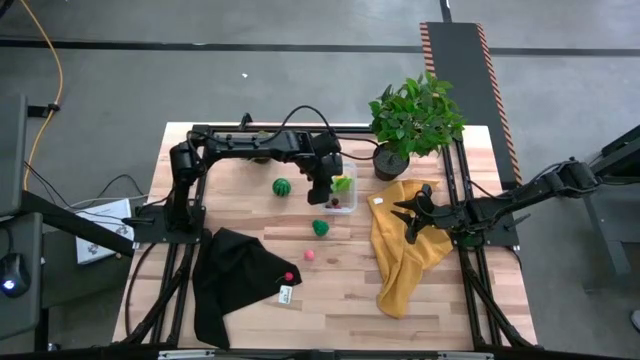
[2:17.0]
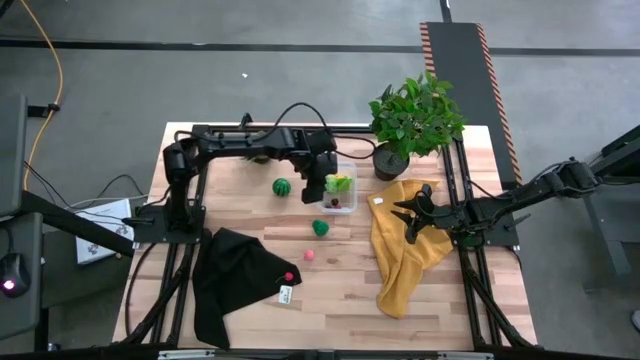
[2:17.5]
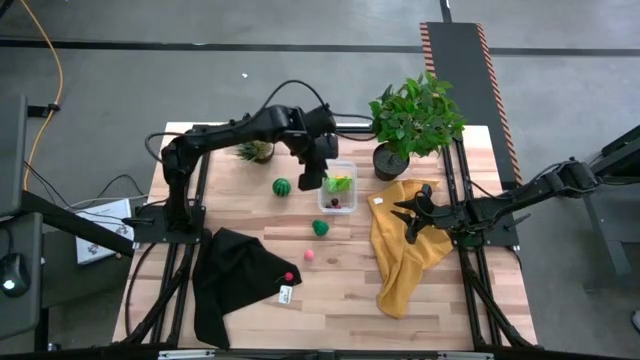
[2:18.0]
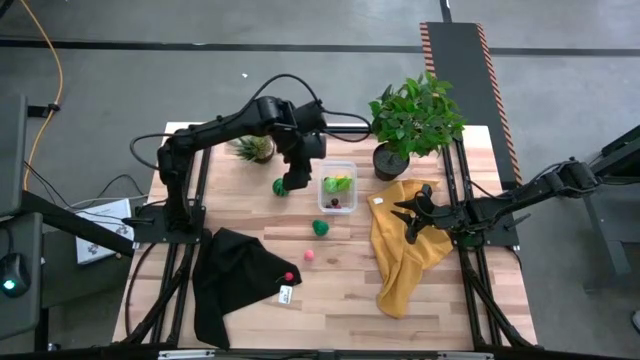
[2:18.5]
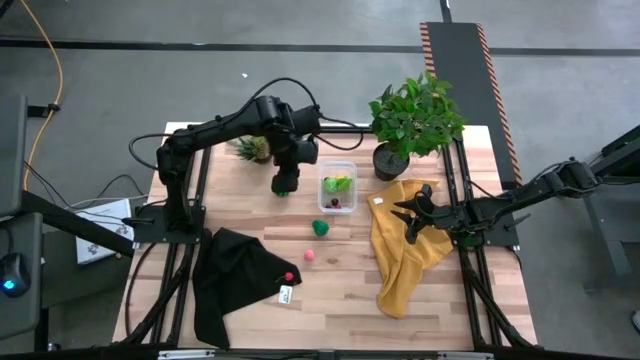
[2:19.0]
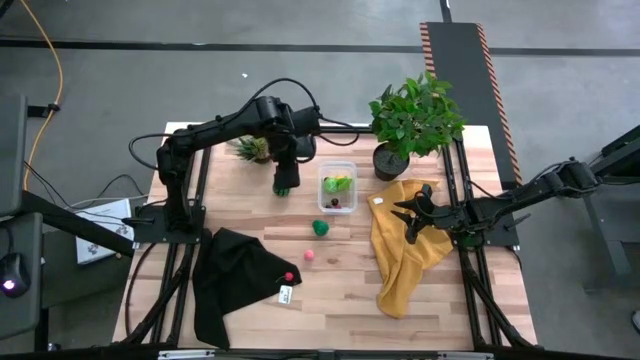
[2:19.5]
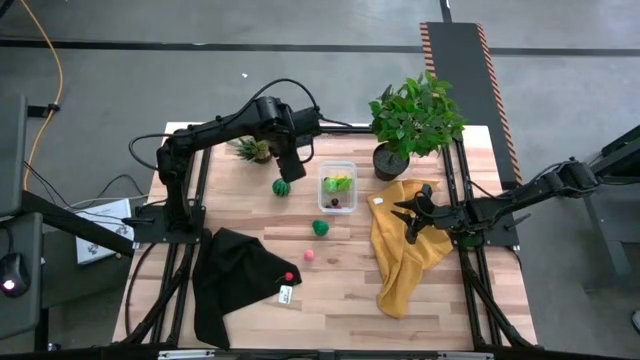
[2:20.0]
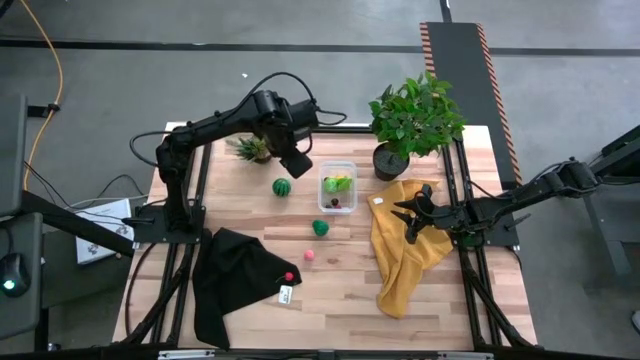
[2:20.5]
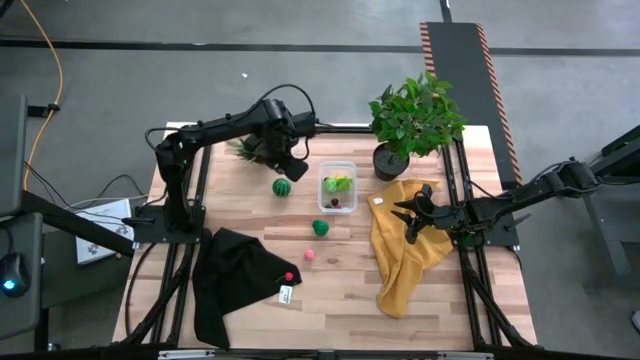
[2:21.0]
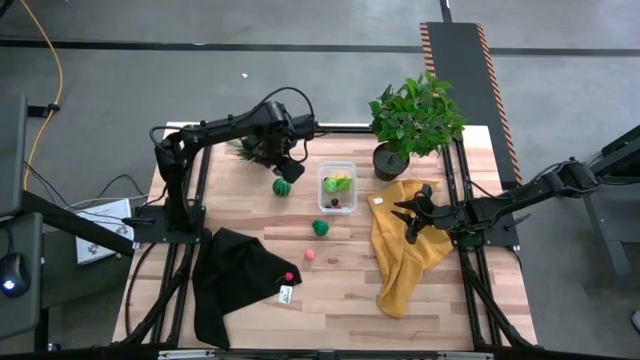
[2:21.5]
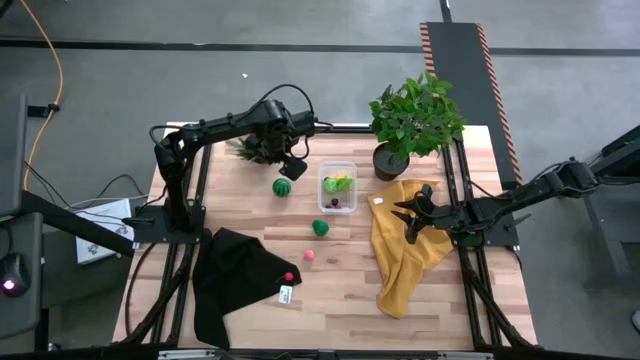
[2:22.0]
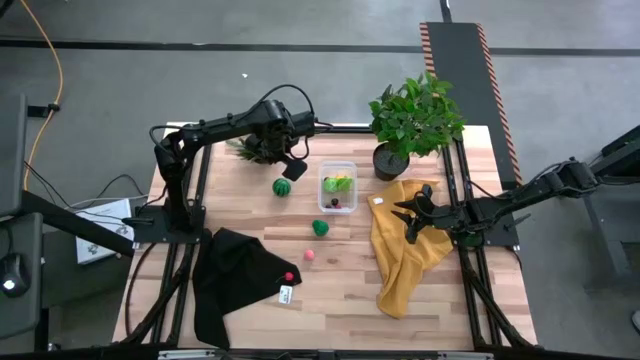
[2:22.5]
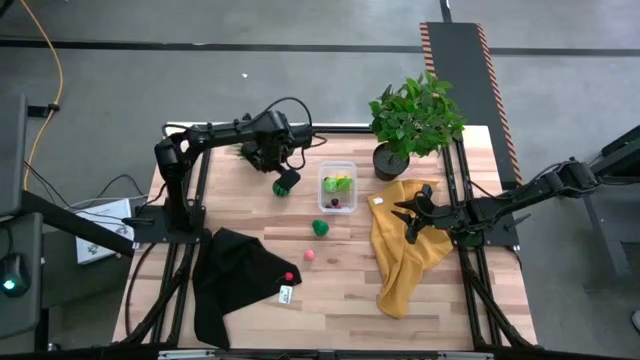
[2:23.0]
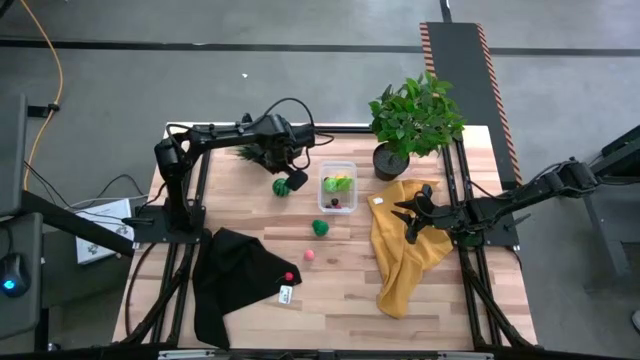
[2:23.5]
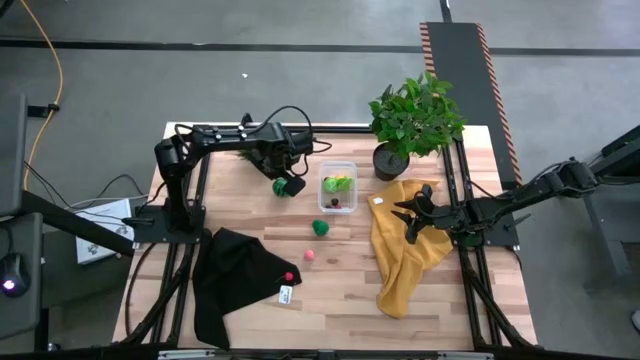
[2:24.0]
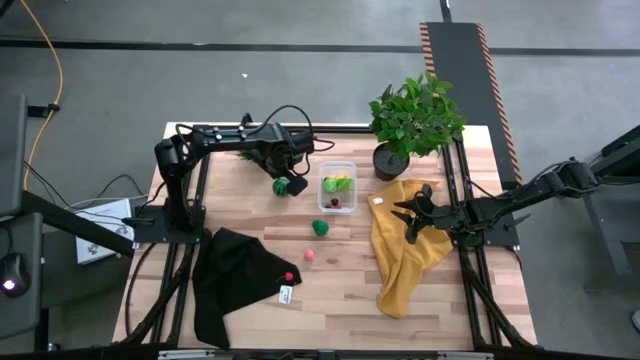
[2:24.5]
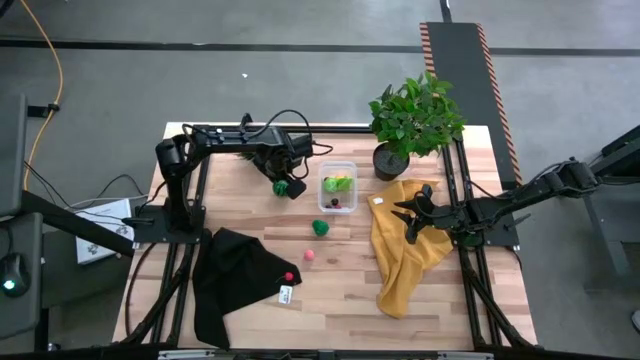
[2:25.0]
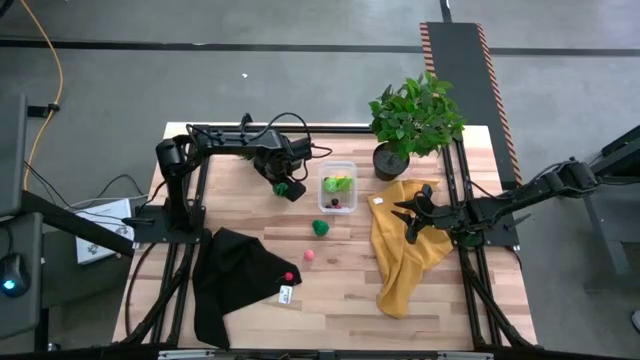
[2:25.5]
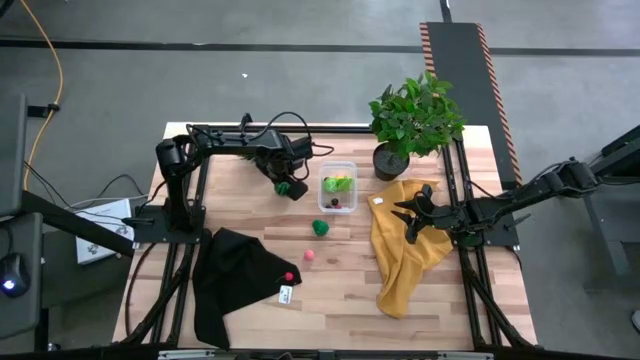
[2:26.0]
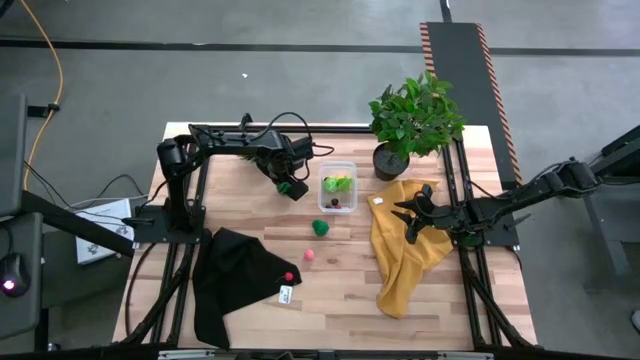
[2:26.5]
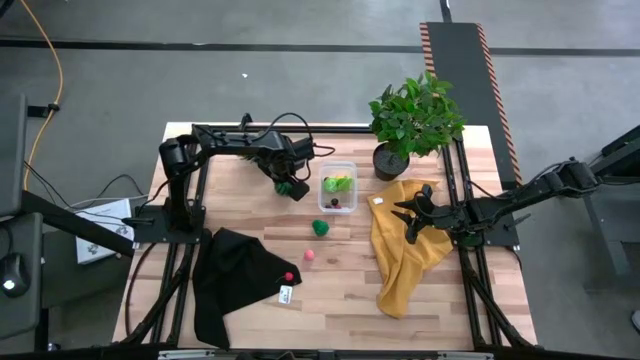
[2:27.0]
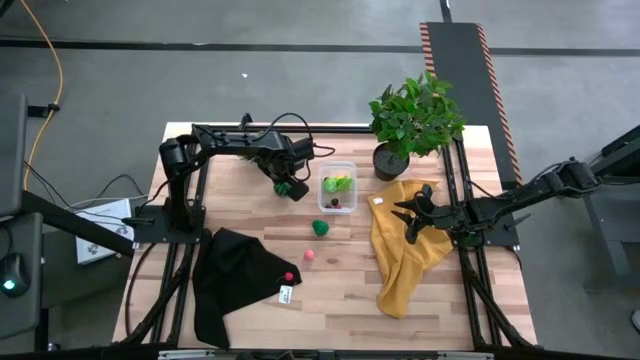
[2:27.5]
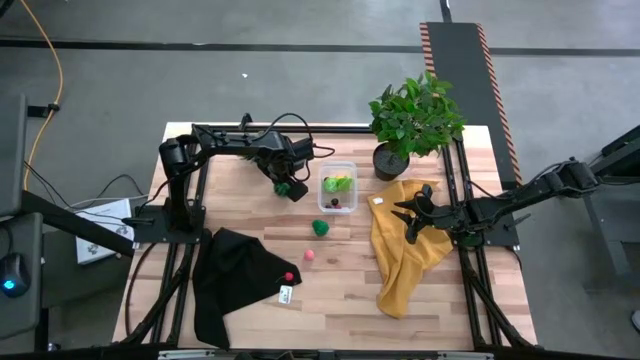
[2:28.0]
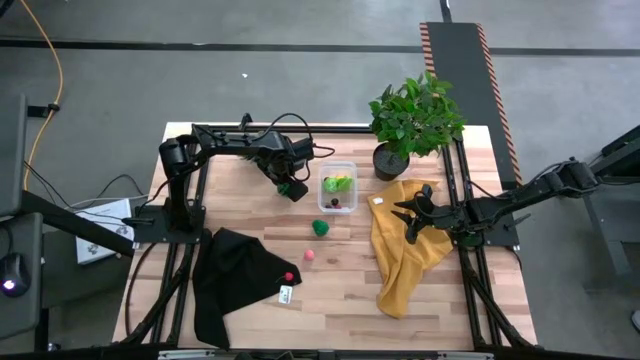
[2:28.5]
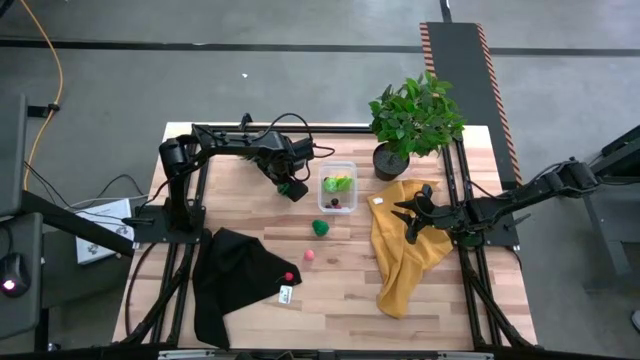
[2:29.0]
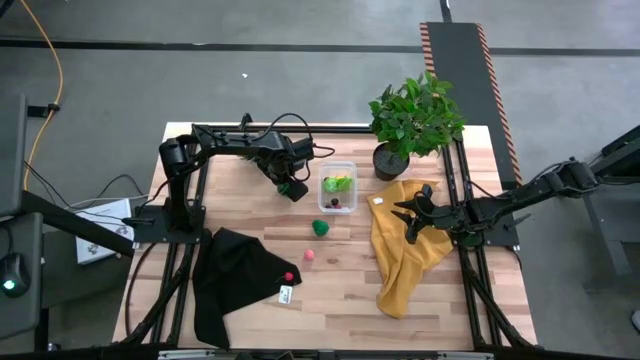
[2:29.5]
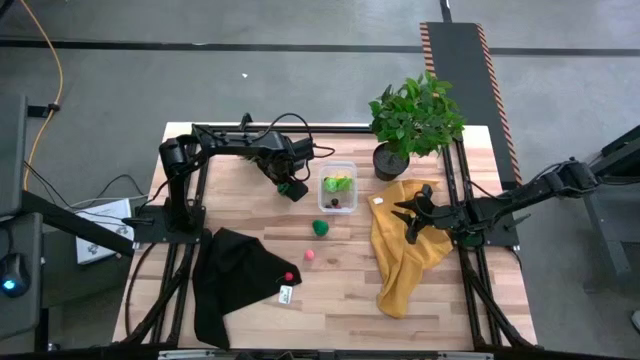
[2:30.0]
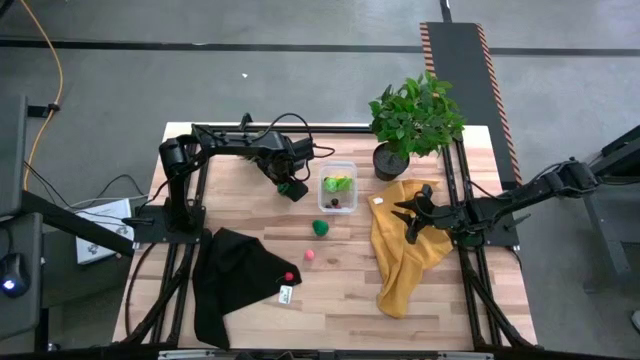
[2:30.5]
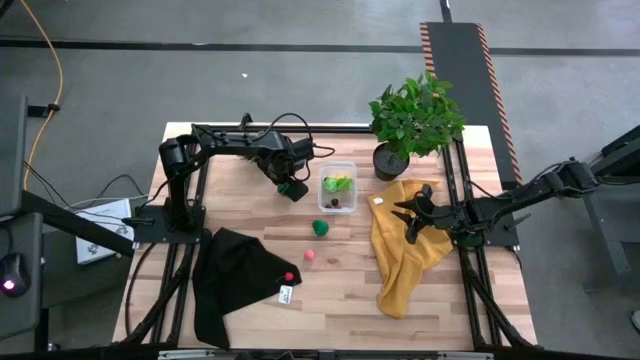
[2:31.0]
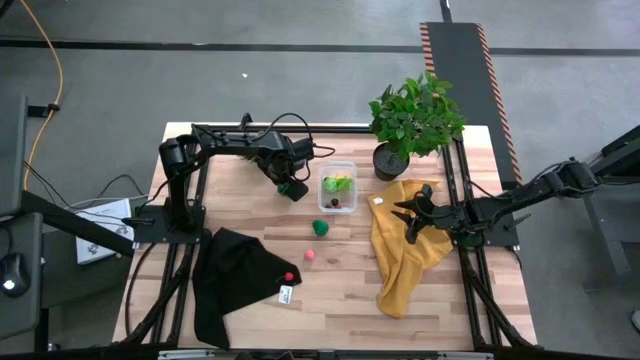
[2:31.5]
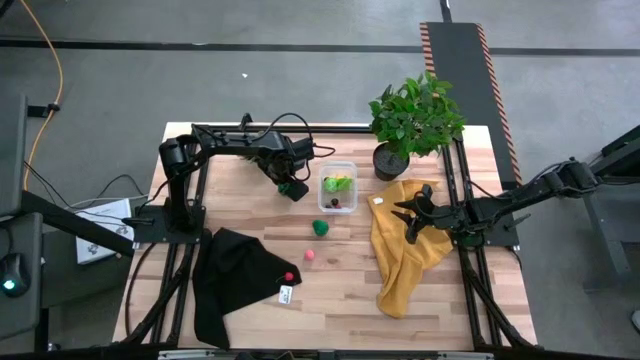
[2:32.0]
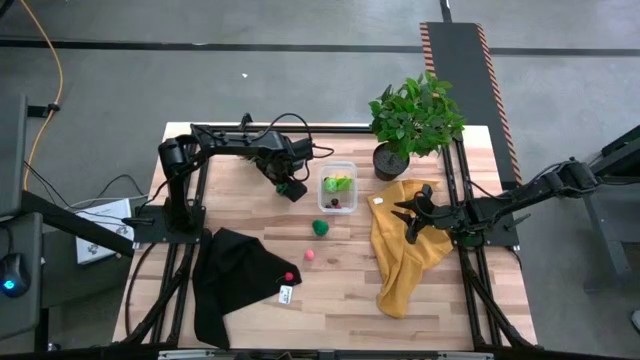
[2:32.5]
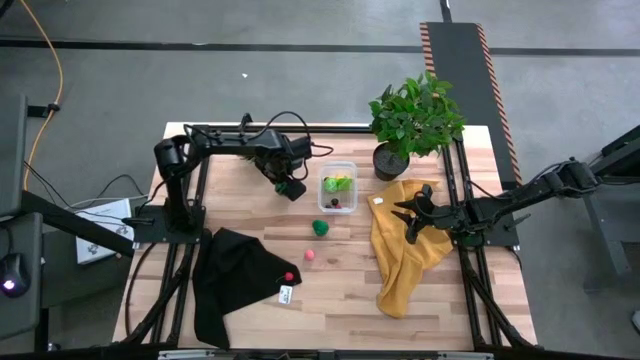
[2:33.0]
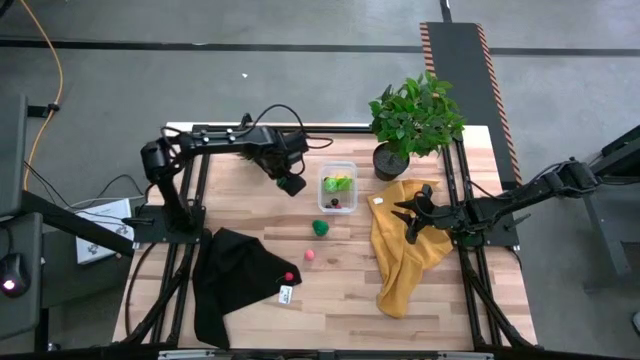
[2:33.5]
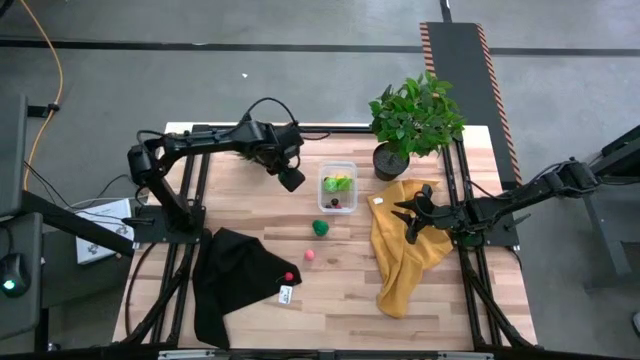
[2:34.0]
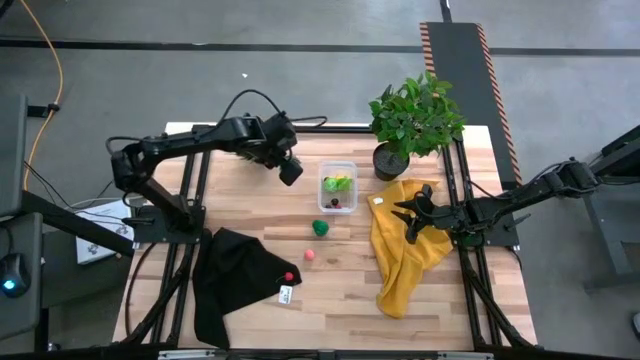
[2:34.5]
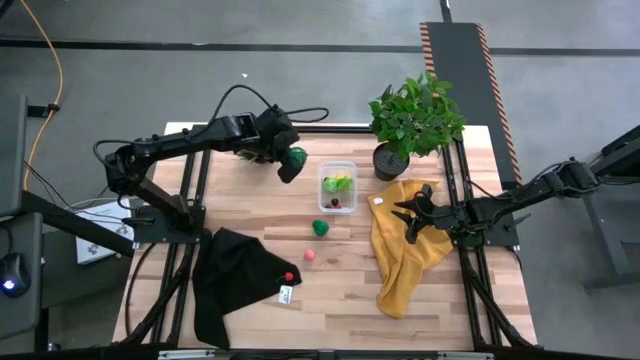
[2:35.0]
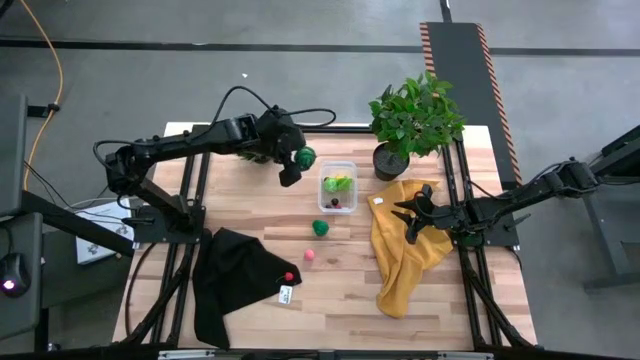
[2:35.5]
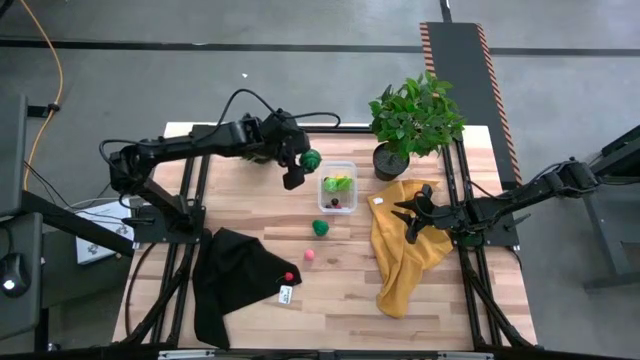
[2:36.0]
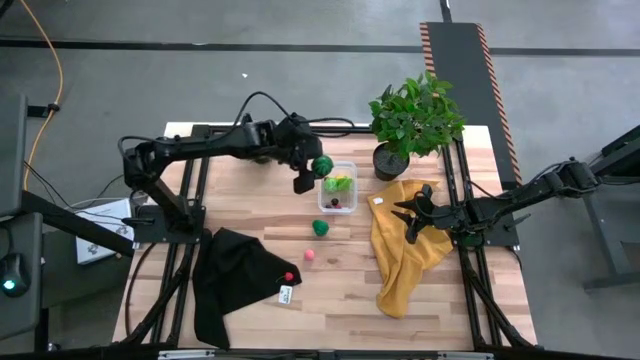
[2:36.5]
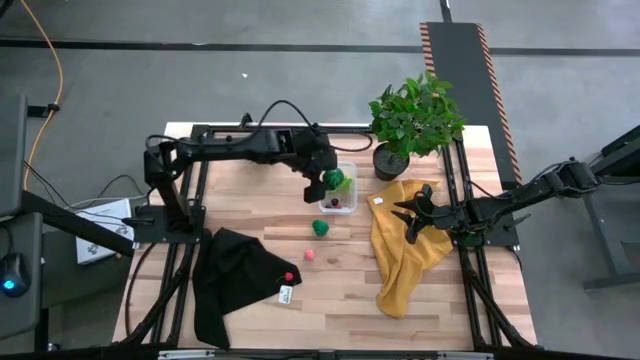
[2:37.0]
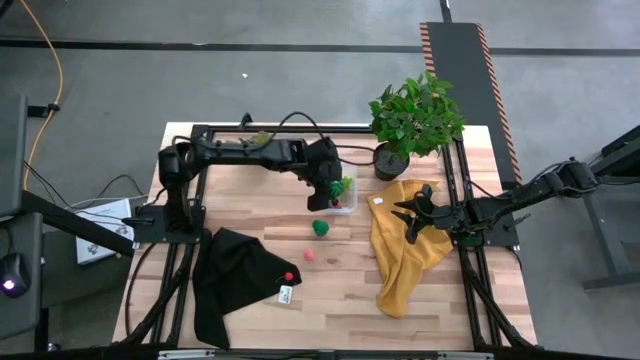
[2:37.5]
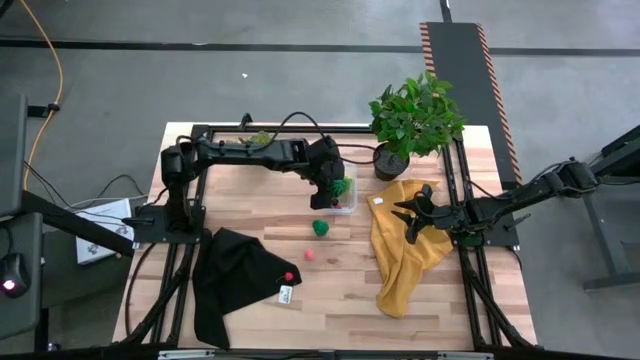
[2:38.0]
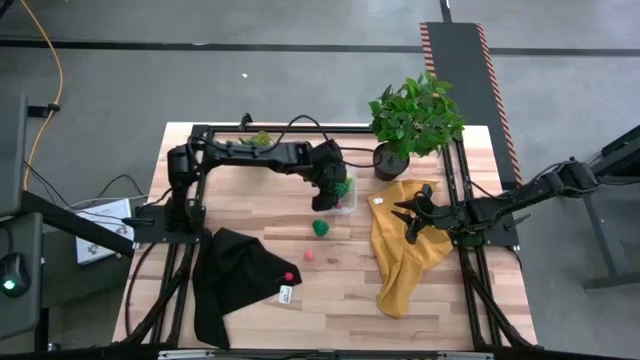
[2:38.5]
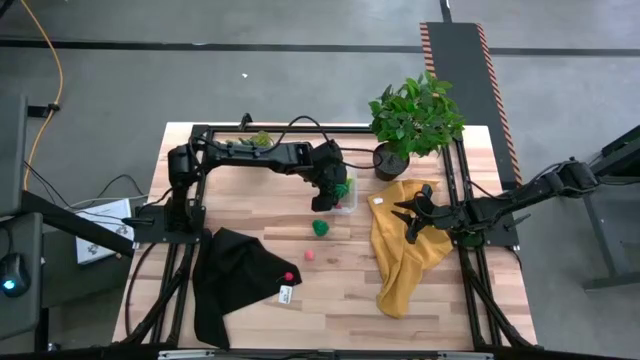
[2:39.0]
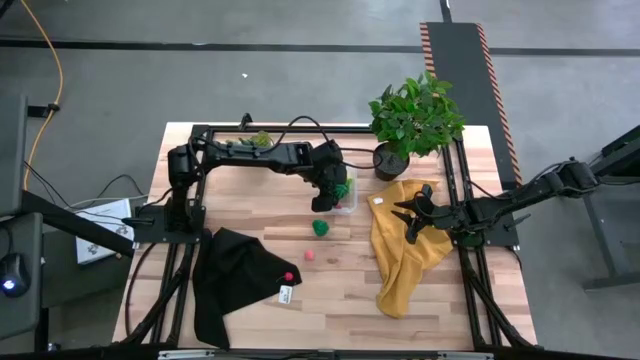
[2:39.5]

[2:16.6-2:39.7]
Task: Pick and placing Produce into tupperware
Put the watermelon into the transparent bin
